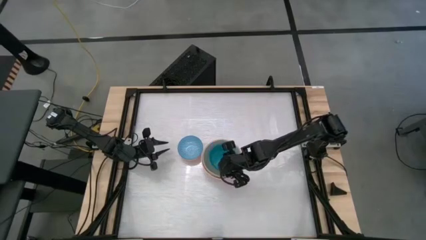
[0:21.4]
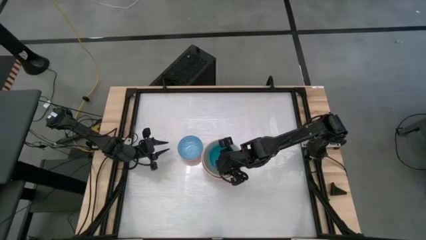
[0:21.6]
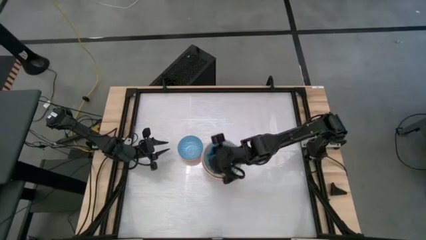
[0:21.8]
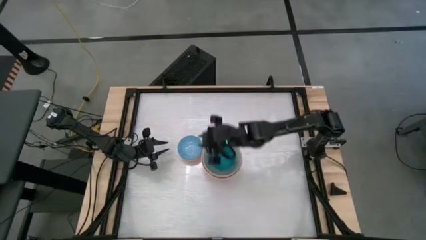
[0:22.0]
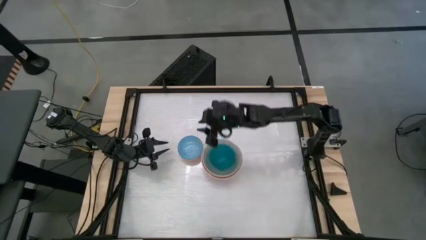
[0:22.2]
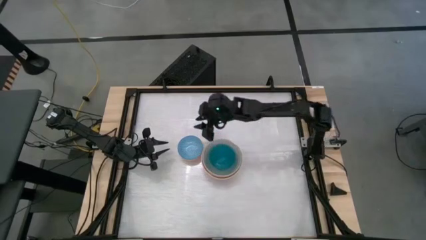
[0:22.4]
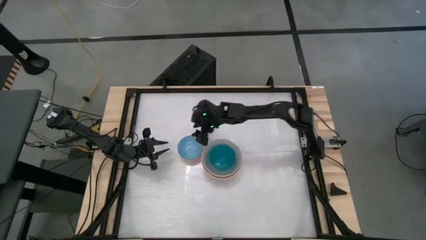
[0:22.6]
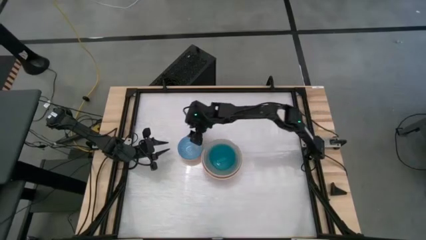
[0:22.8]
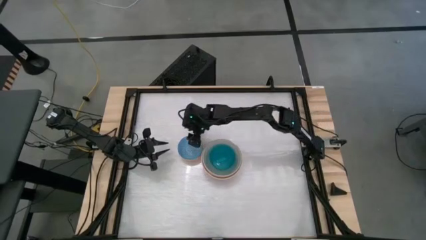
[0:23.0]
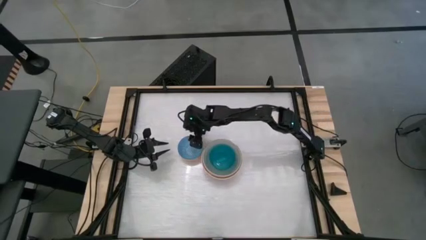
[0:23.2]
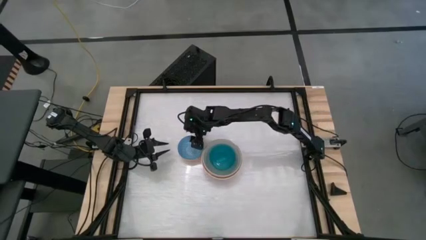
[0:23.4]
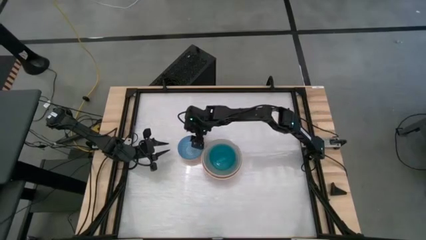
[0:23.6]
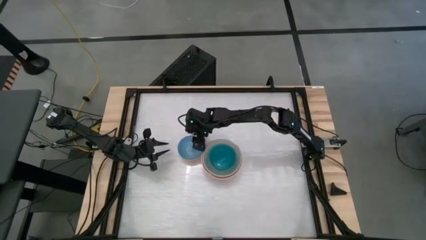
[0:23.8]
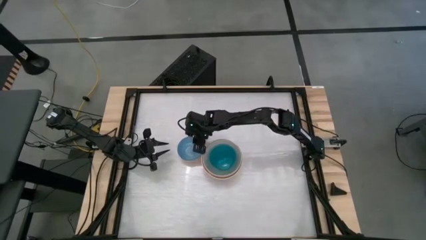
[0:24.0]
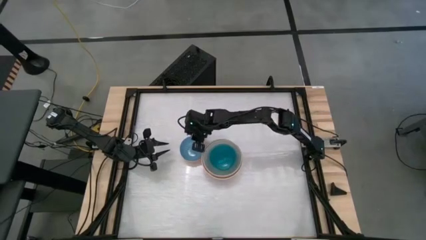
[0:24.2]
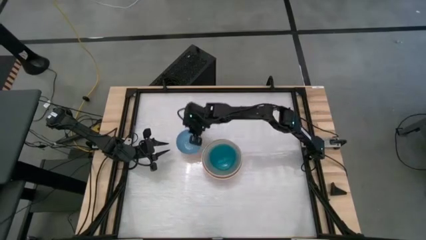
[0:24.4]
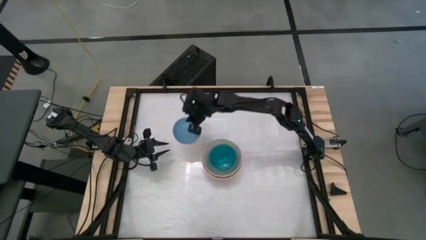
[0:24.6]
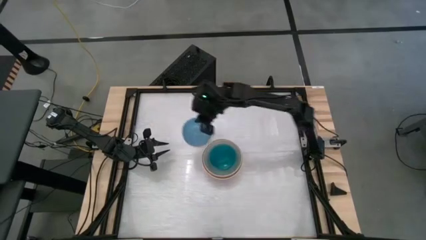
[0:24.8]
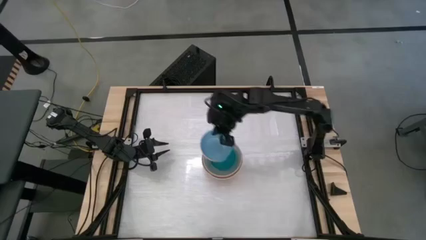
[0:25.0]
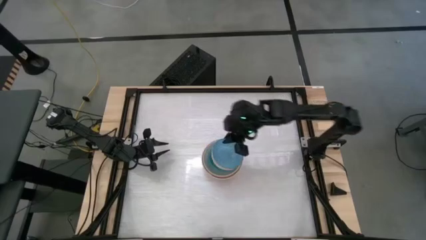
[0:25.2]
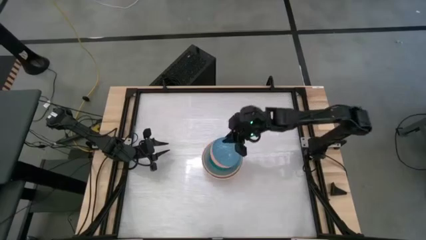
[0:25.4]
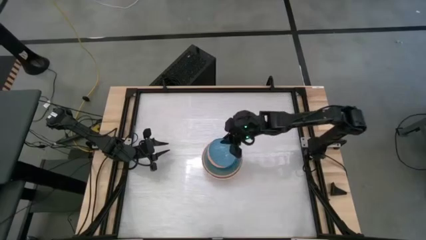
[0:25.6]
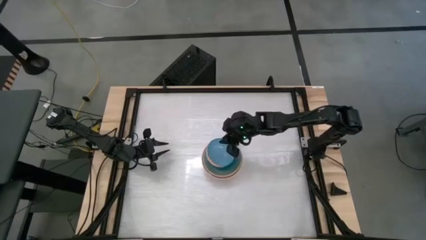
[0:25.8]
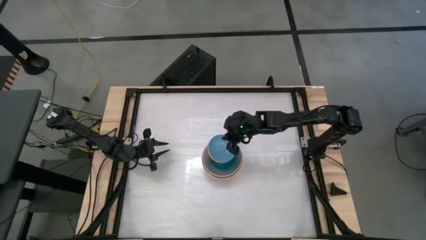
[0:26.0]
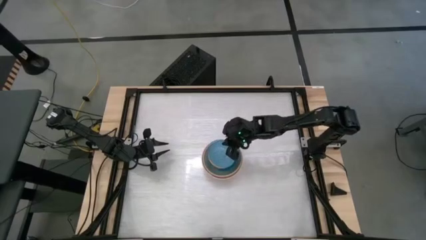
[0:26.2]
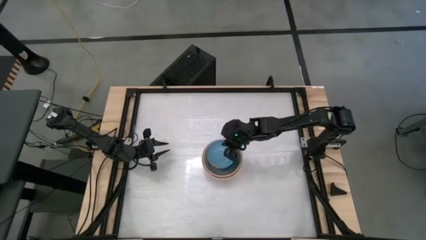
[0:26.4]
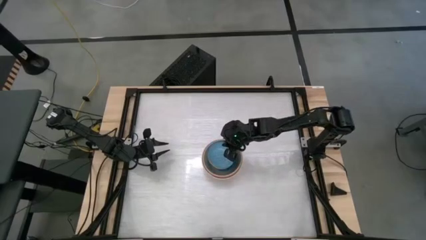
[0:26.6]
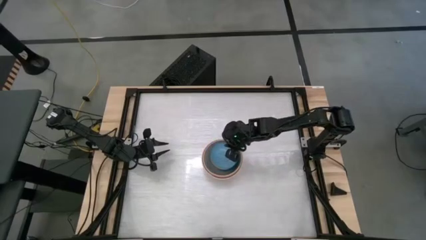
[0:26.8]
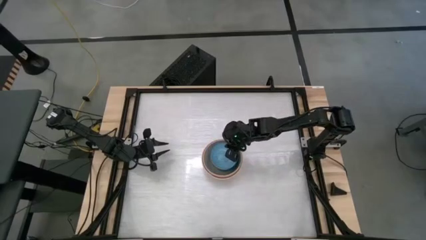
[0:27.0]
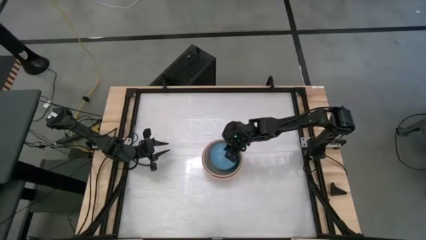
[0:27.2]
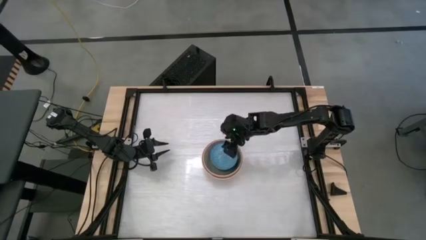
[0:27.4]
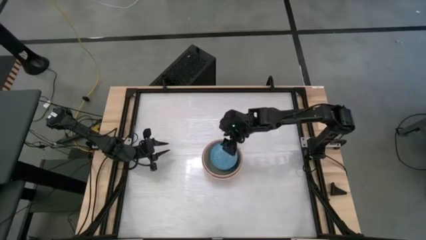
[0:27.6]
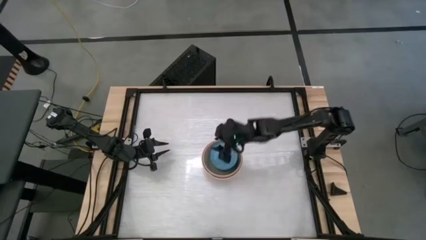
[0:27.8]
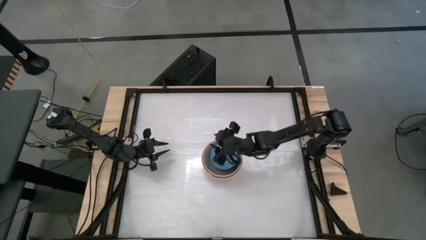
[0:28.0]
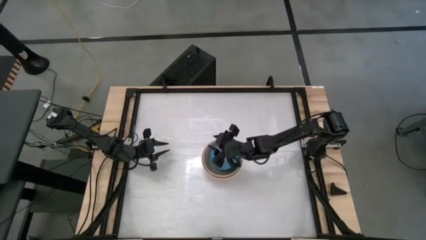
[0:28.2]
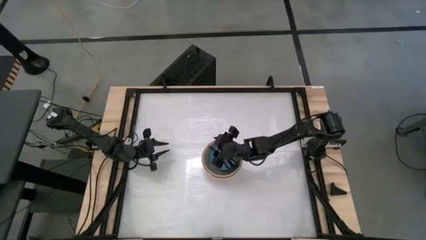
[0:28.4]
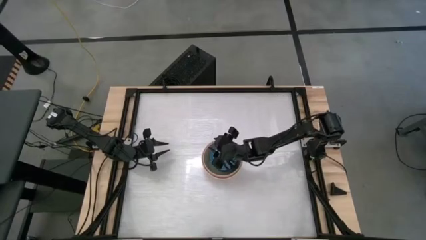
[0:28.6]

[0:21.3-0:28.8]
Stack the patterned blue bowl on the light blue bowl

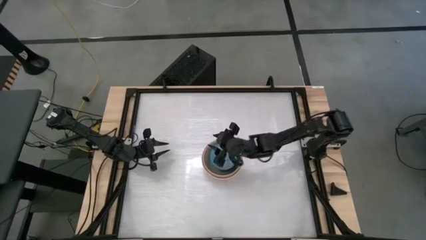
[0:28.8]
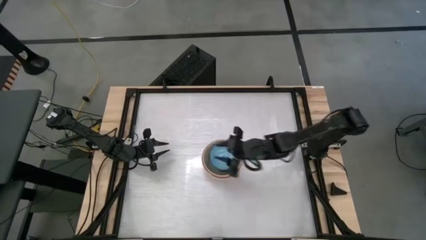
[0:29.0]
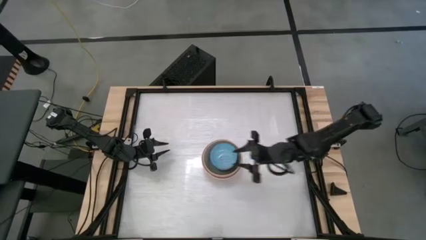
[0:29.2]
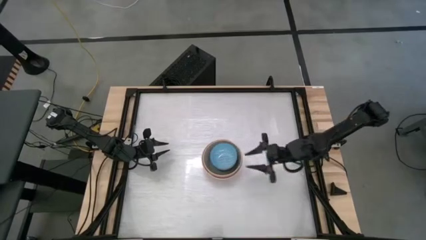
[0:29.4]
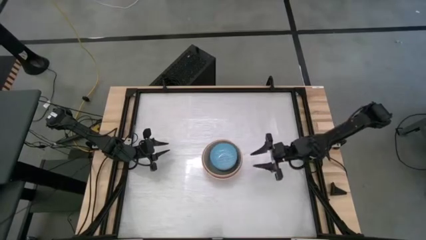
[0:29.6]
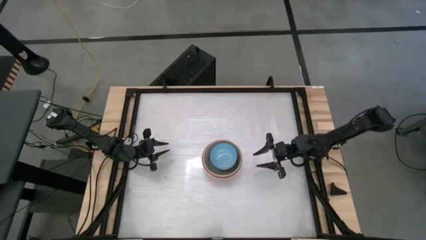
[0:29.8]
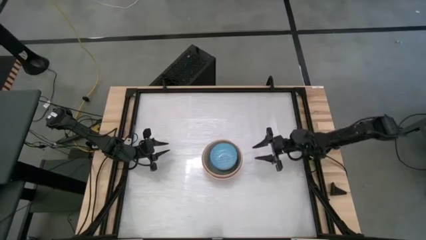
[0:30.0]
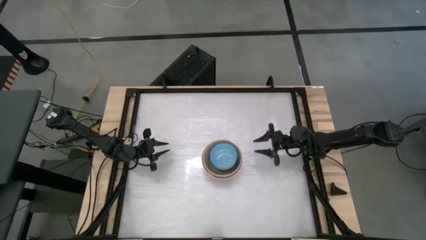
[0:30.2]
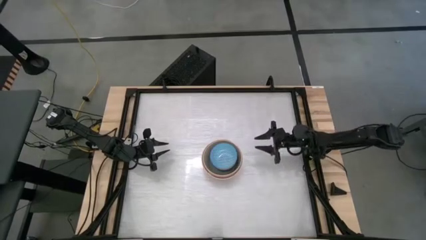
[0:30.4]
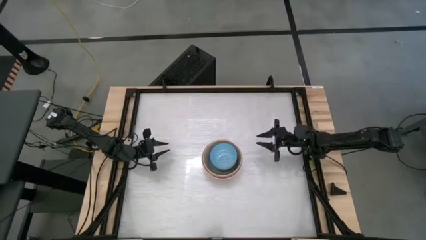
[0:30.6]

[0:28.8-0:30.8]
Return to Home Position
